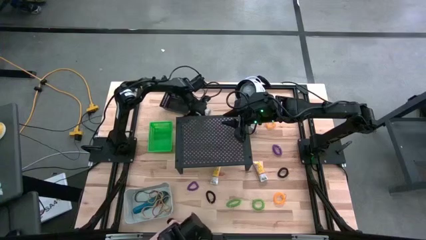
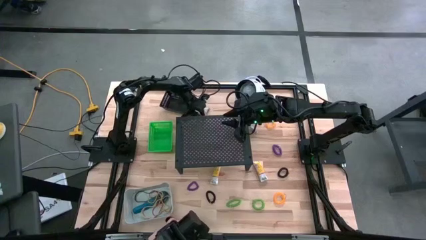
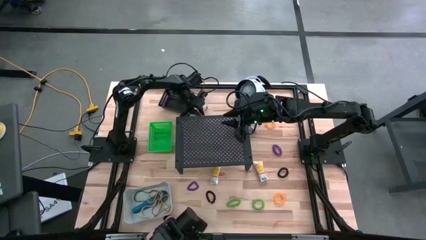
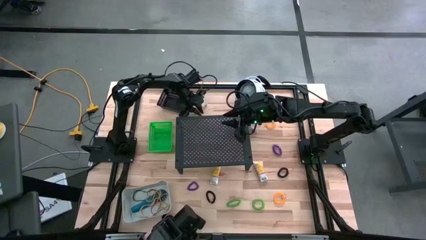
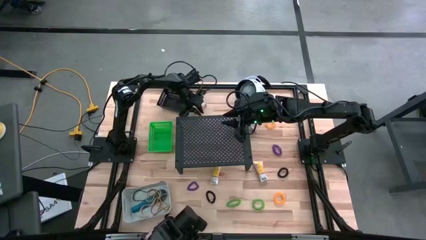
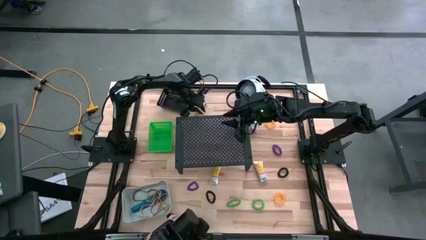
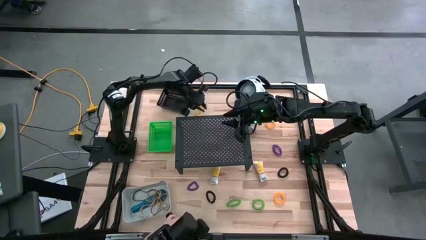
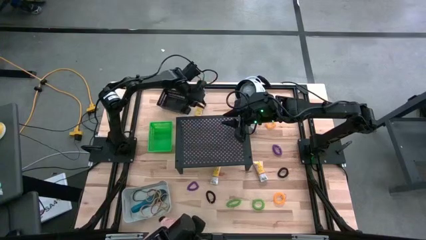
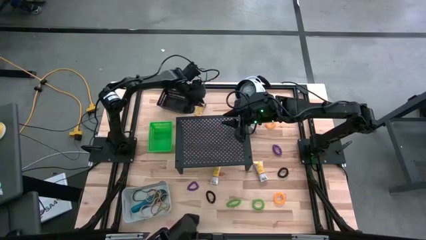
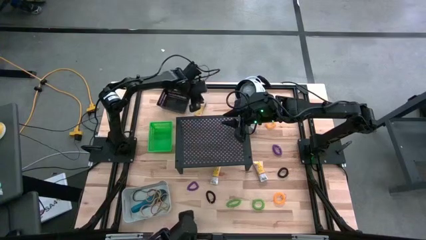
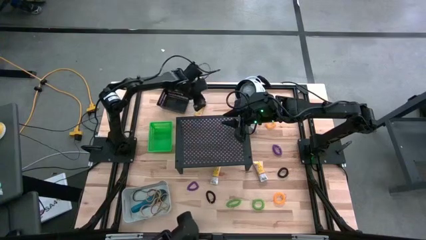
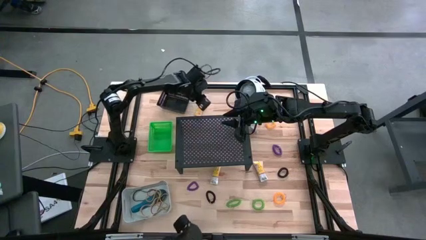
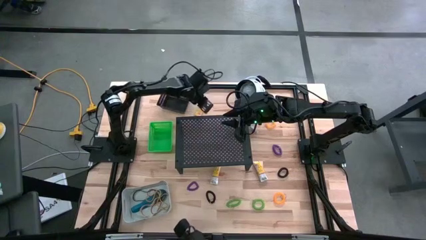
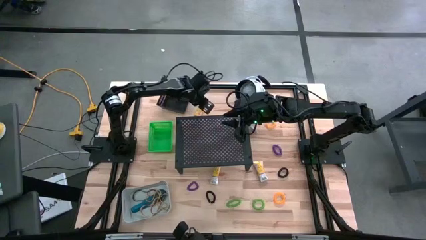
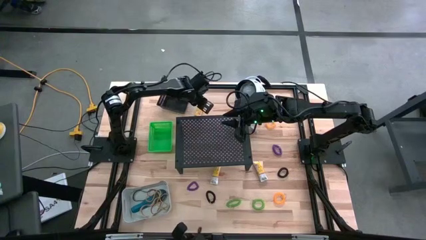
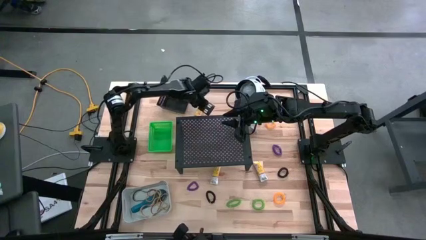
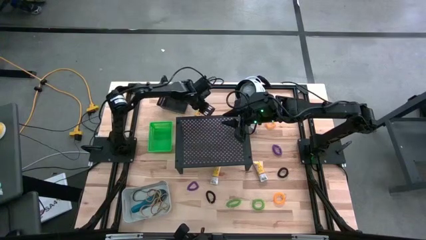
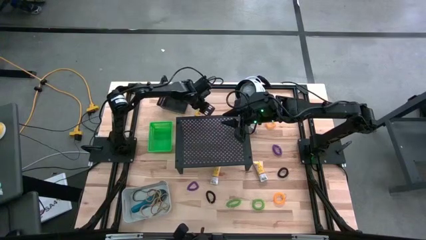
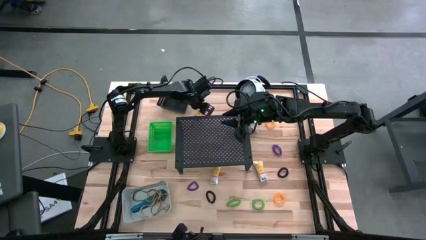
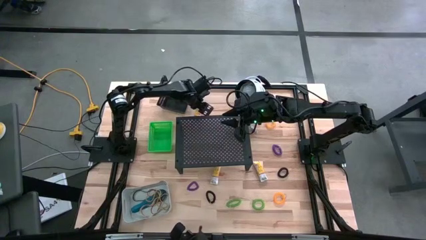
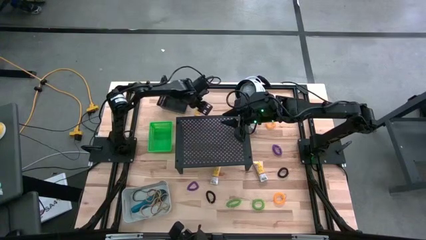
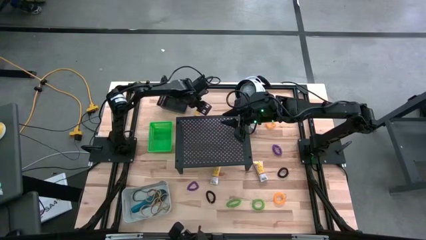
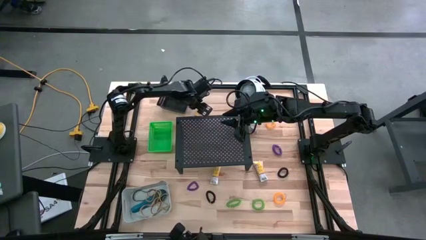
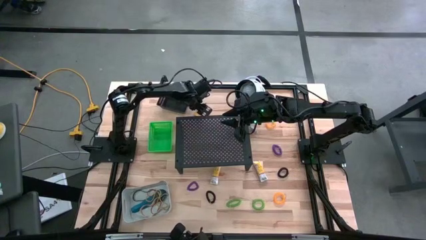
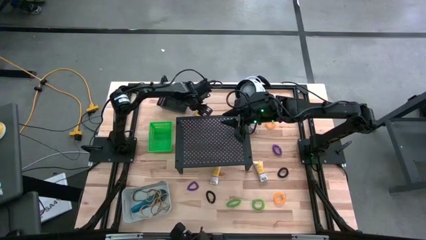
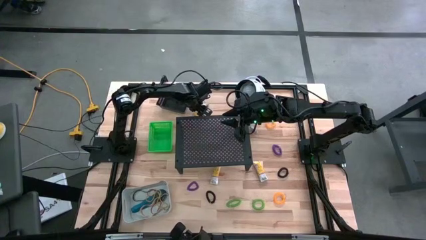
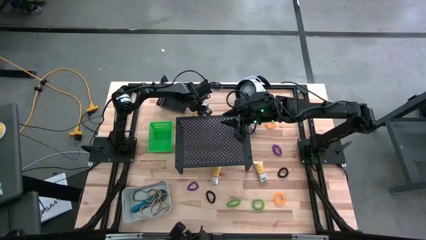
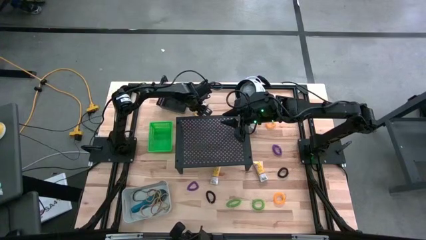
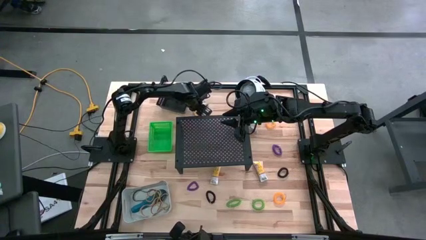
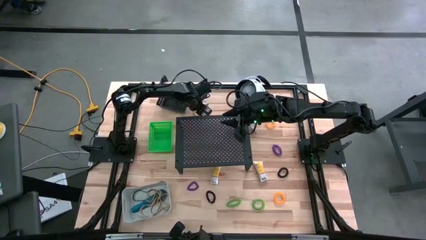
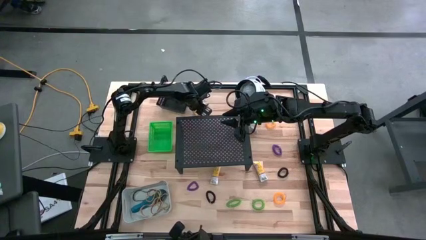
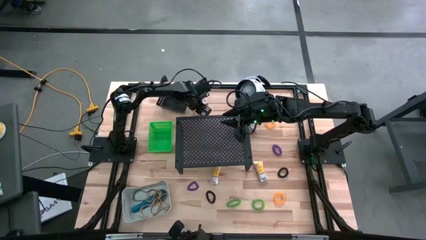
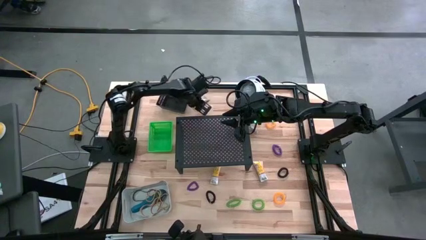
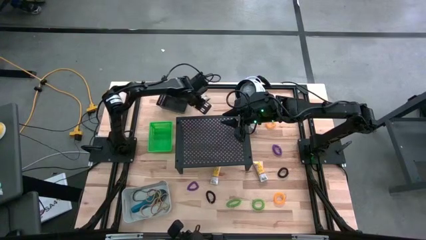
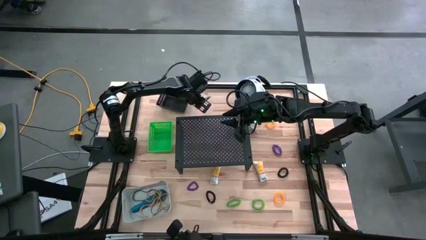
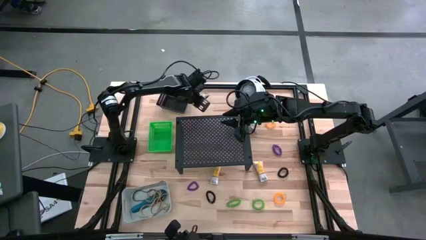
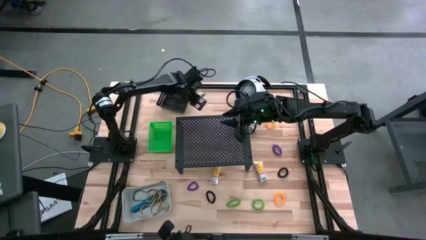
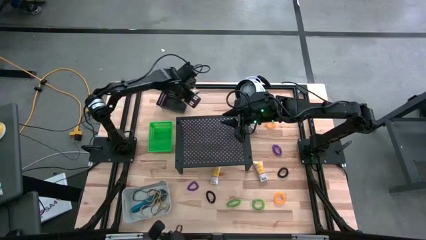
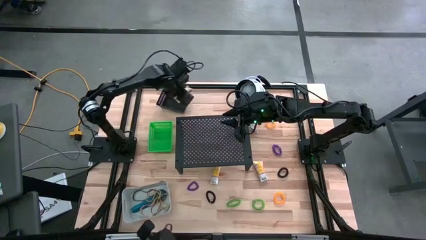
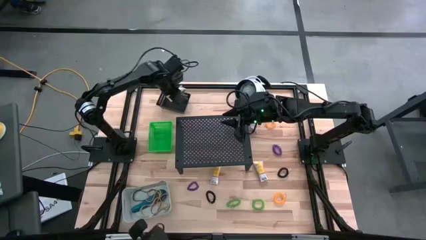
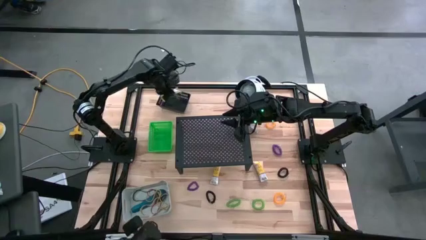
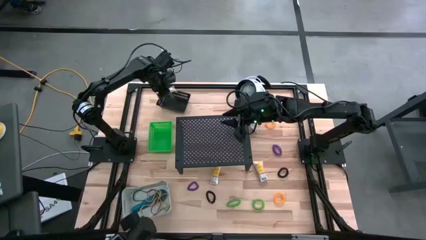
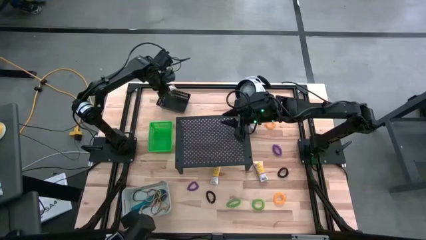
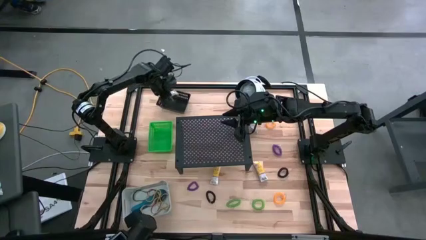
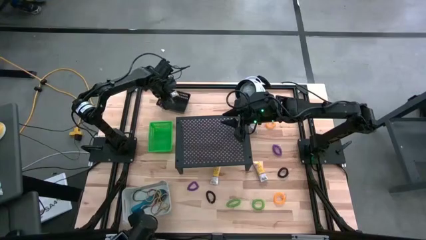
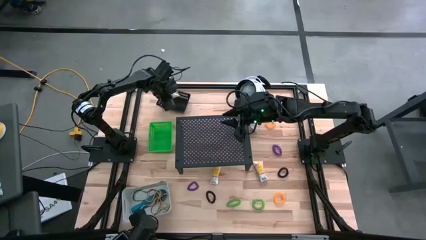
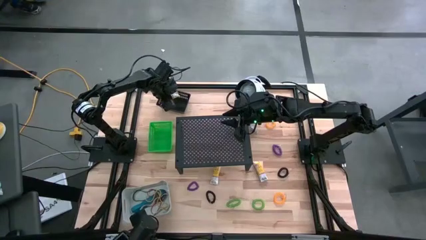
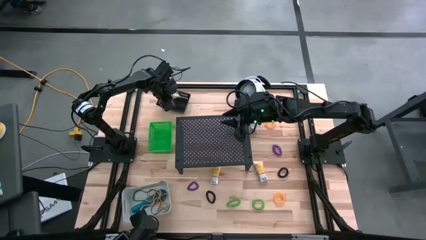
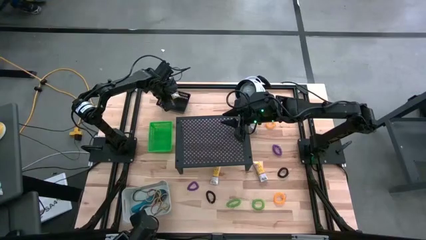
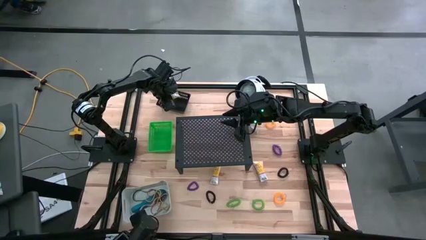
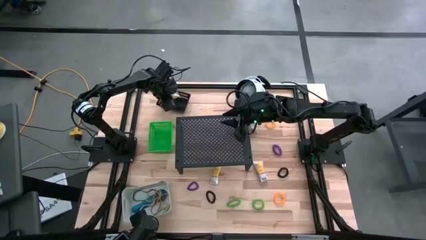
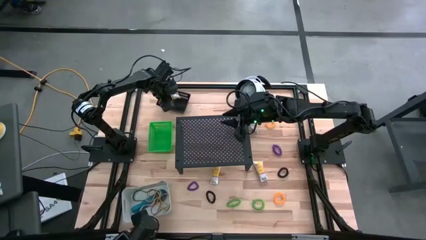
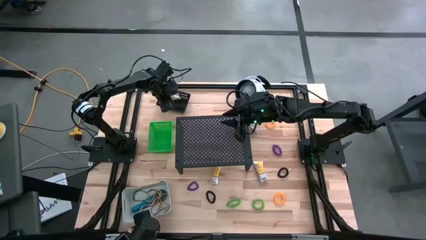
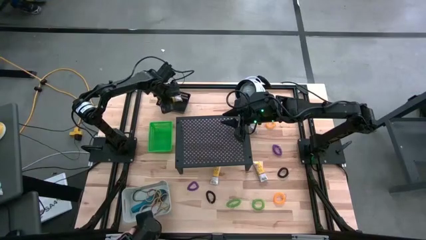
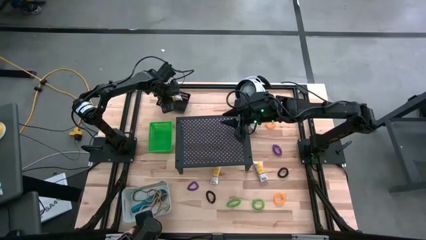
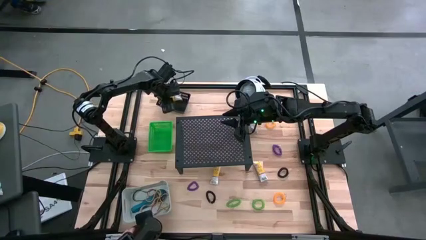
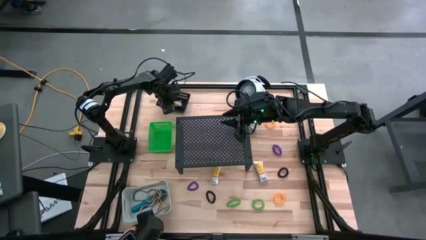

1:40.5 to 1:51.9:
Task: Pick & Place Office Desk Supplies
Put the top crayon box into the black bin

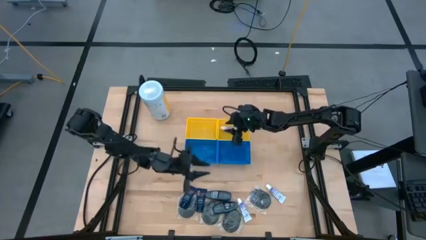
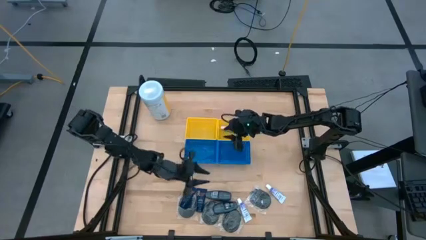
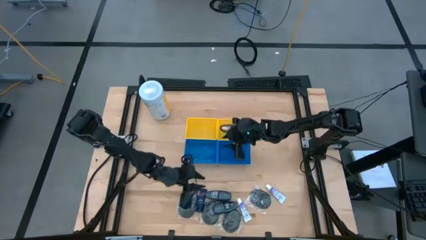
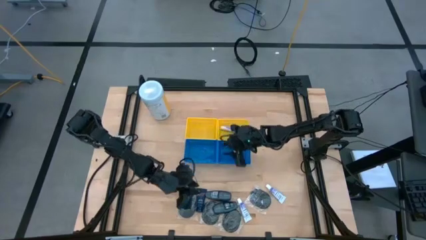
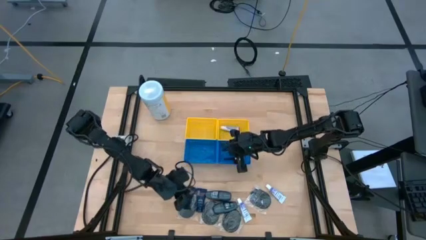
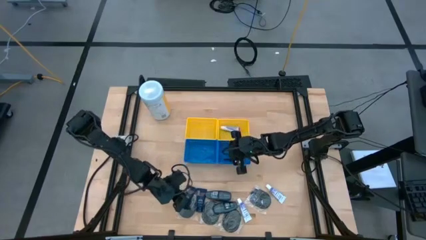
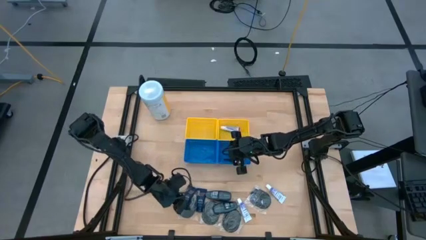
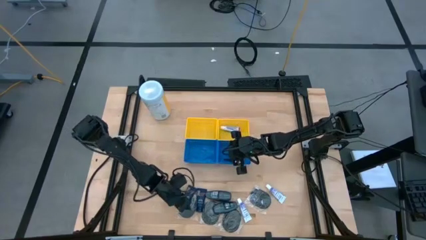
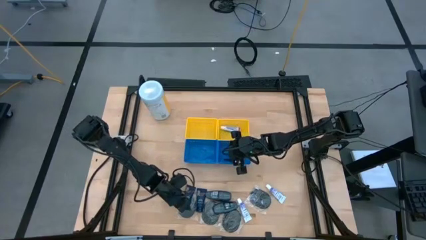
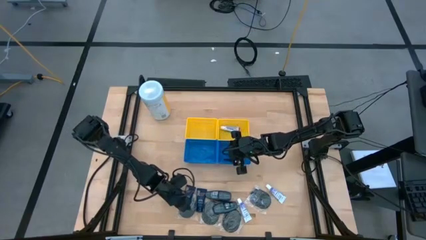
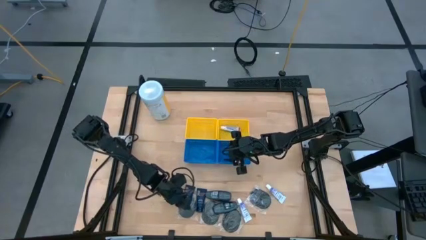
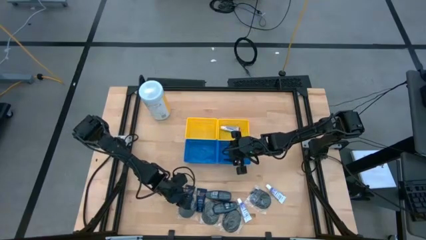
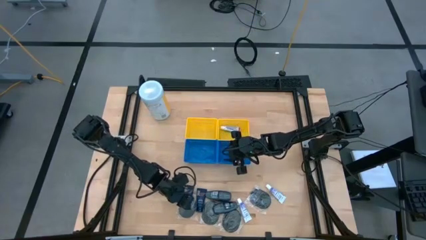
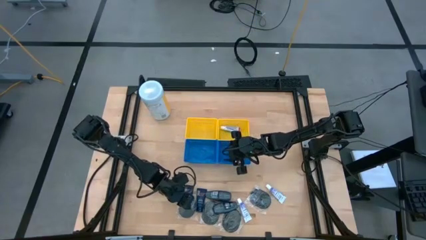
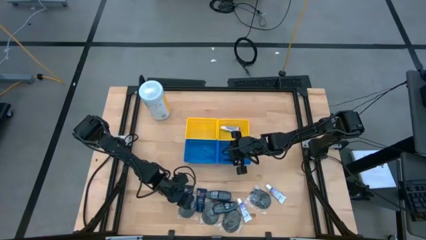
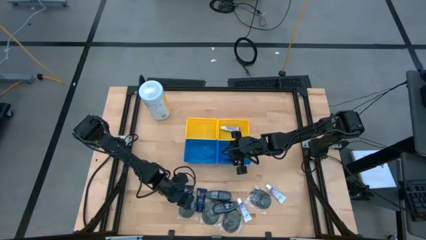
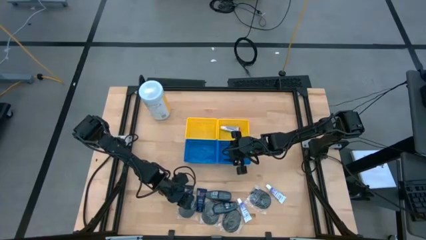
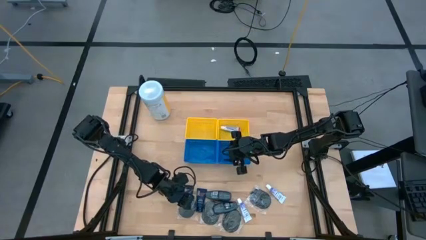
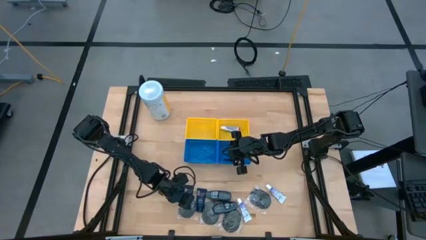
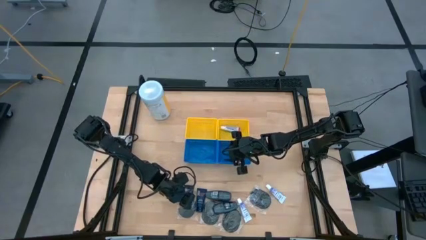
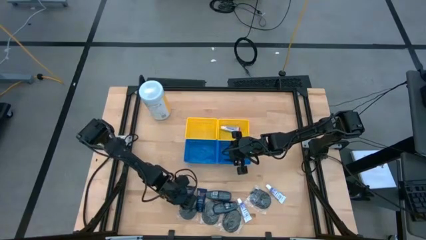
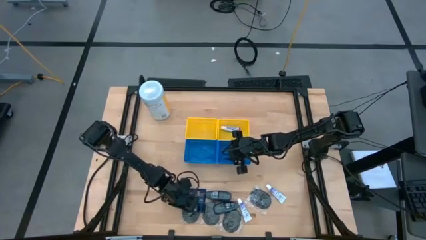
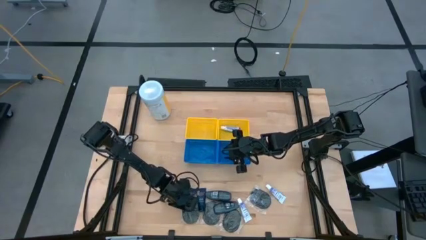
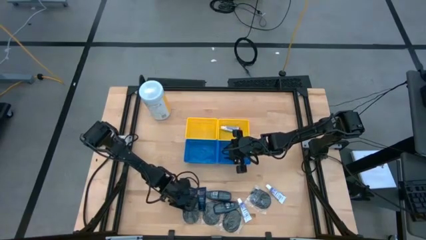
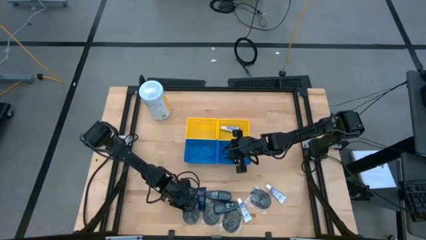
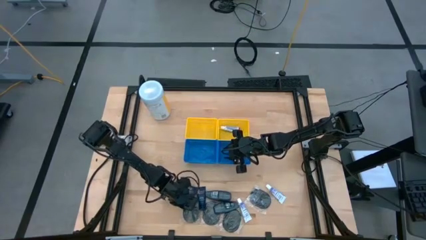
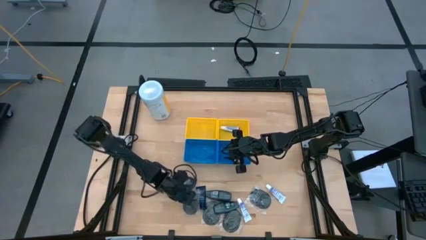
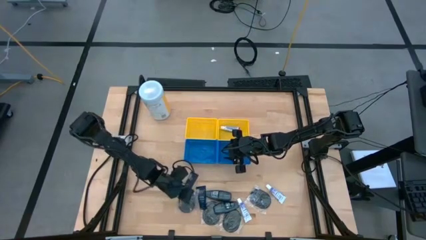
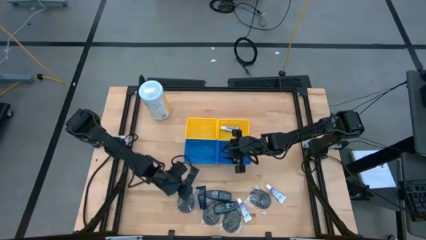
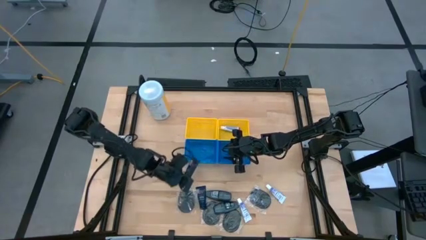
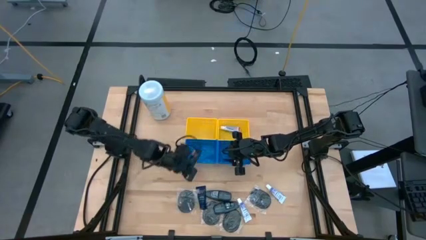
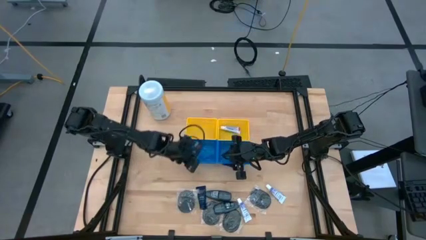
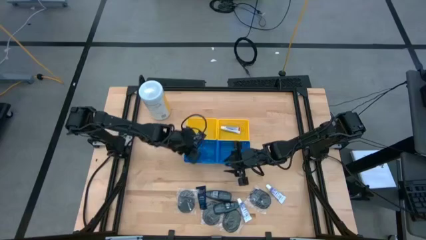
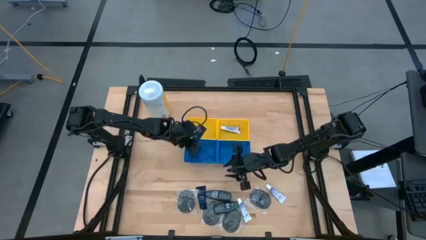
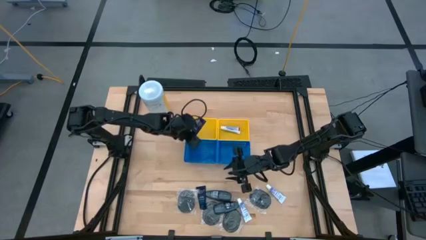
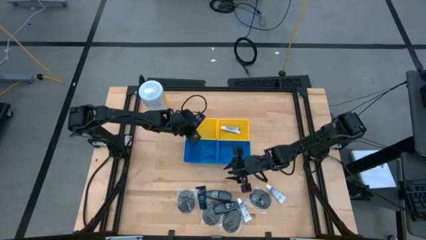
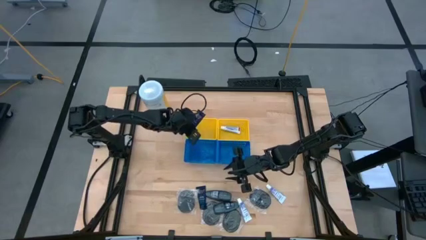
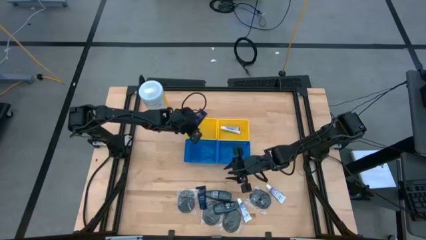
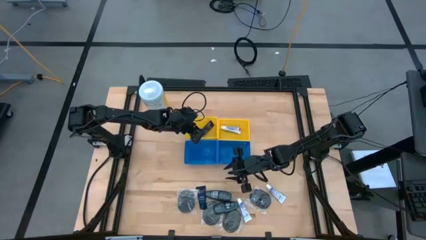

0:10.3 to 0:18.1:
Task: Pick & Place Travel size toiletries
Put the left shave cream into the left yellow bin
